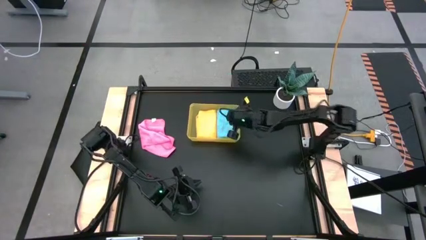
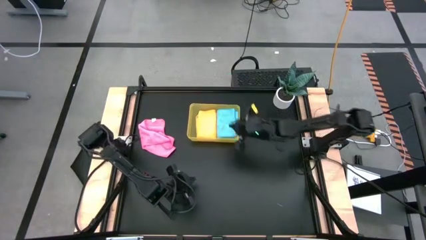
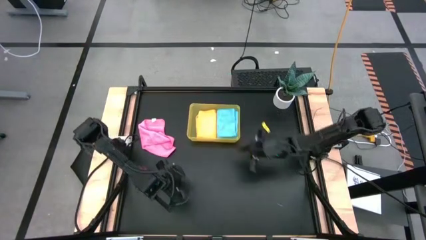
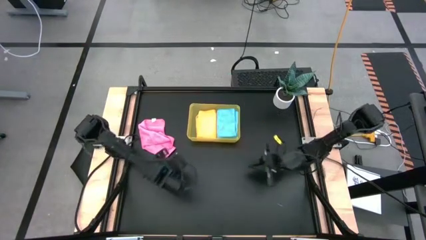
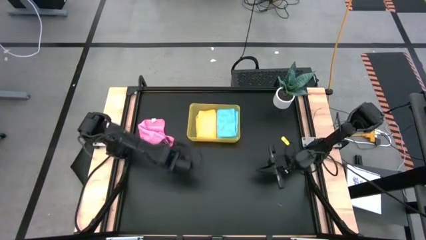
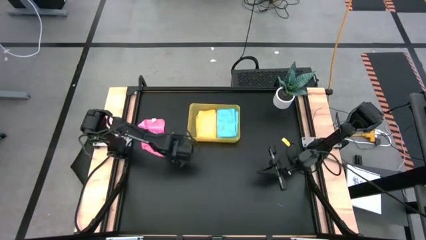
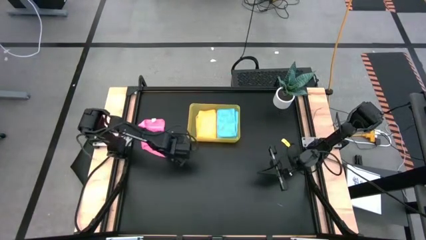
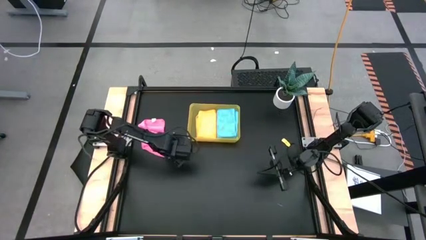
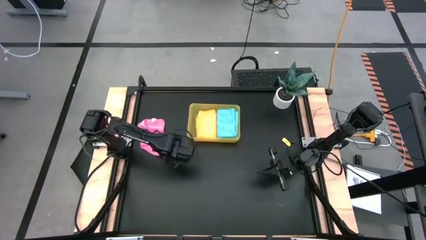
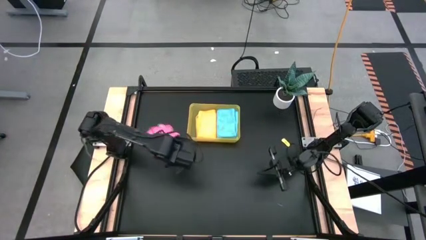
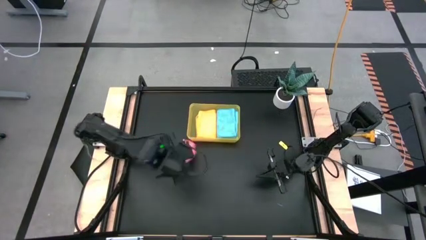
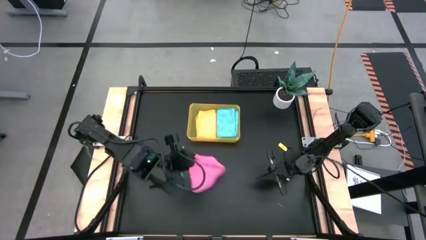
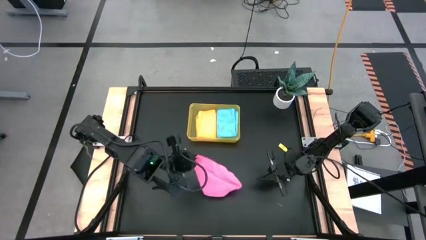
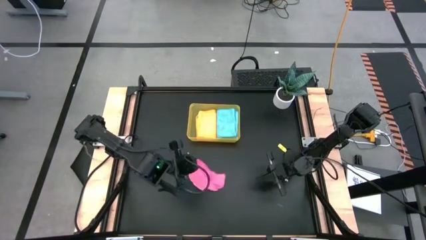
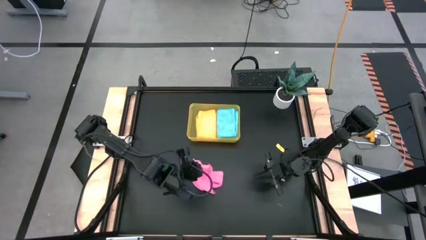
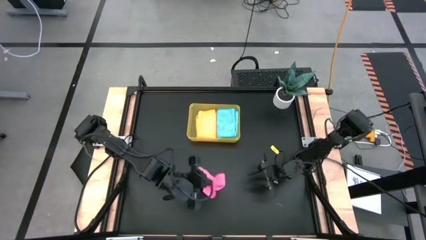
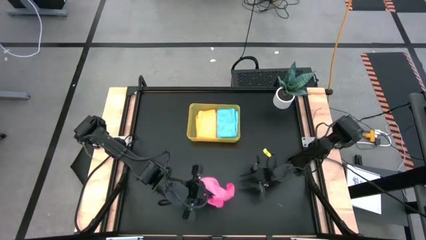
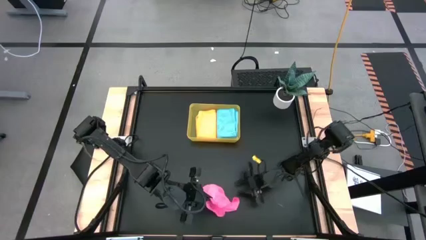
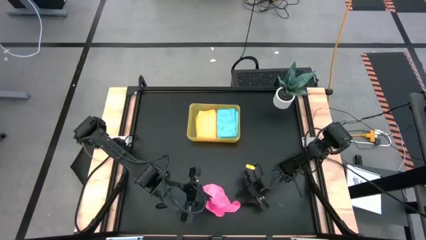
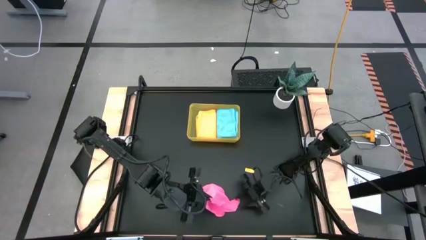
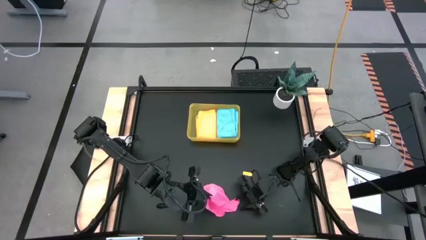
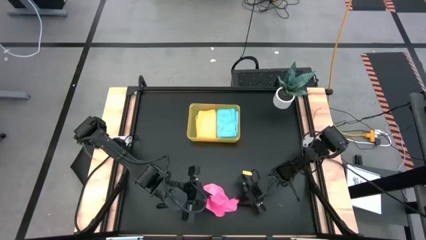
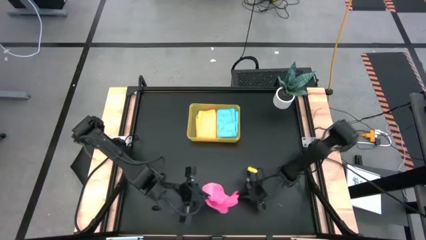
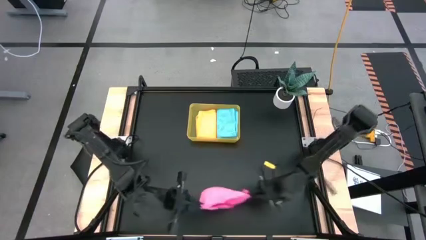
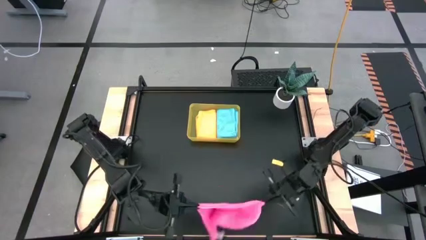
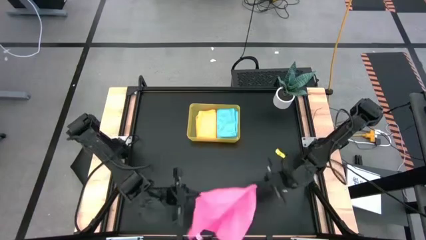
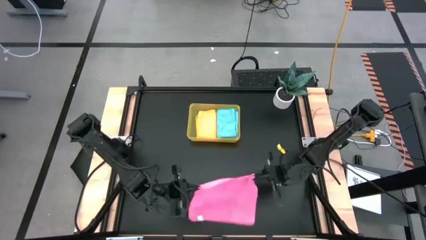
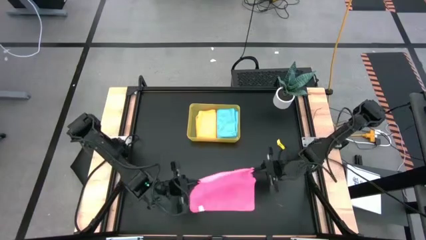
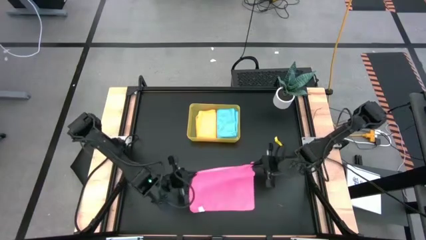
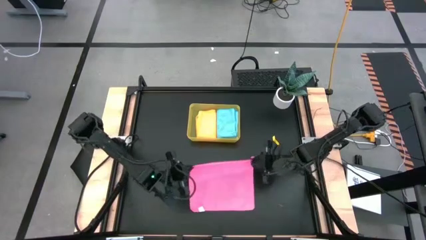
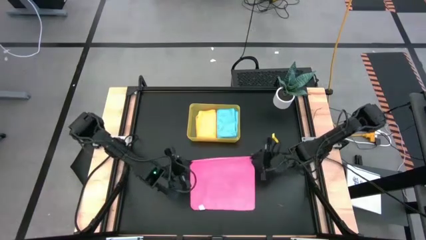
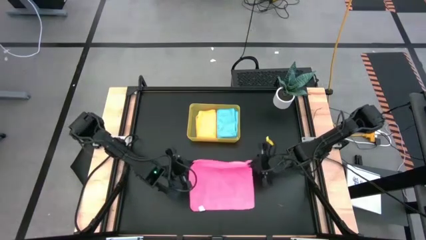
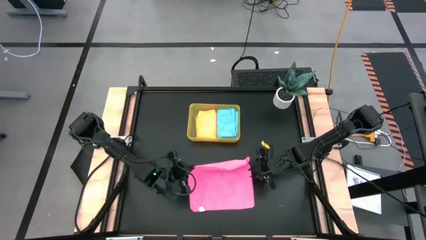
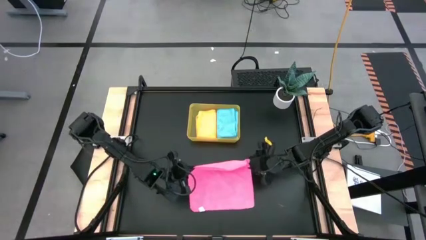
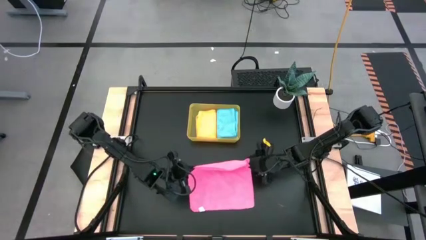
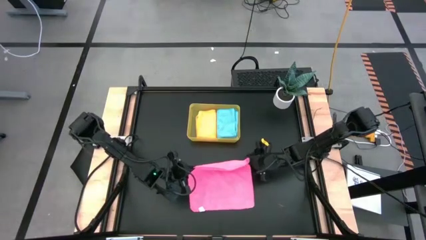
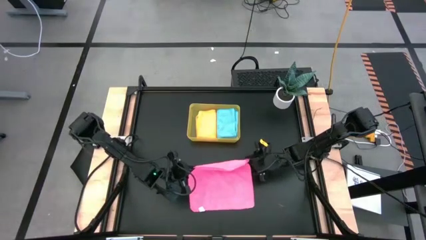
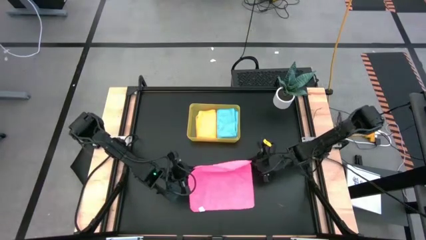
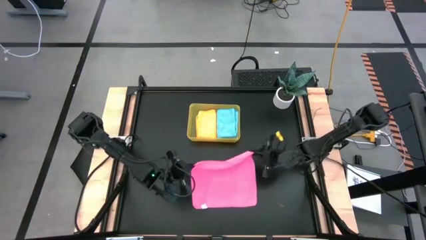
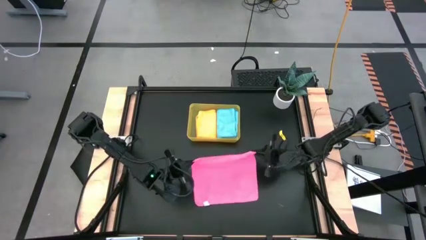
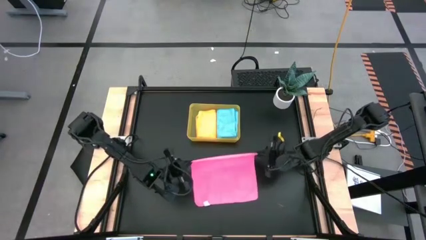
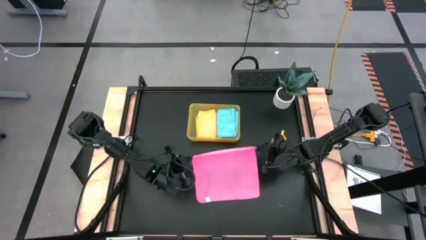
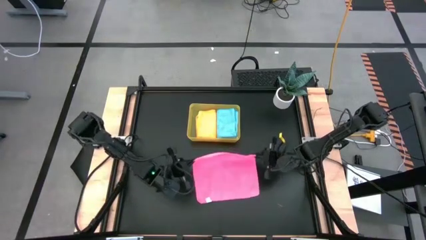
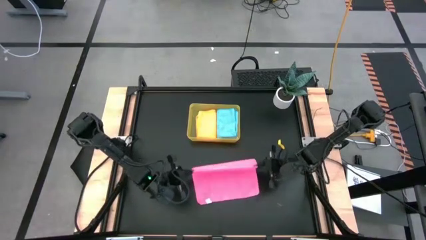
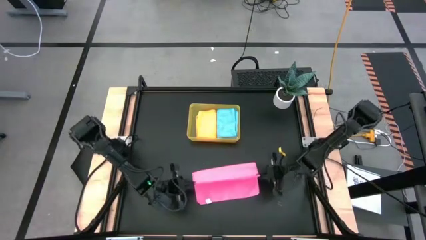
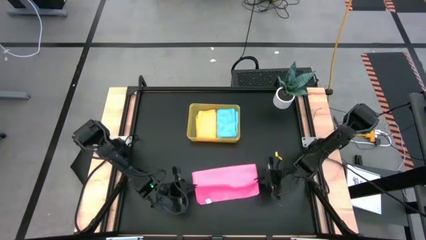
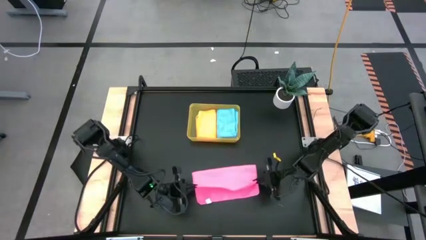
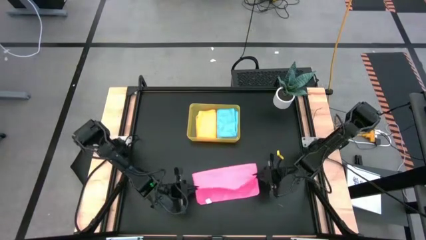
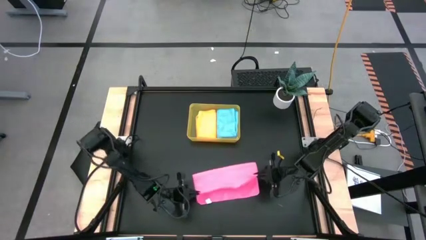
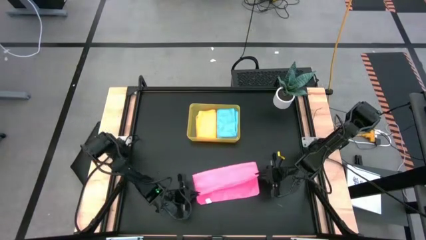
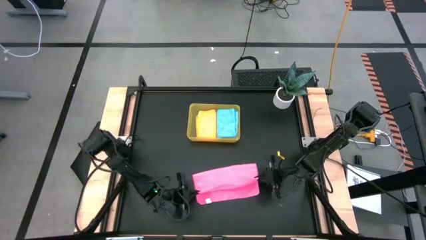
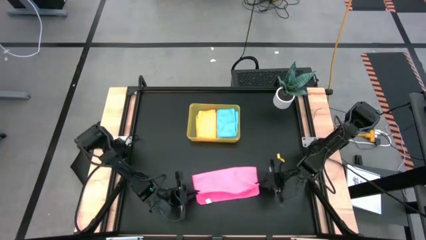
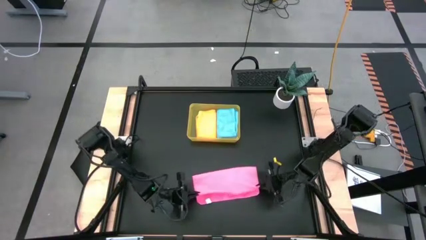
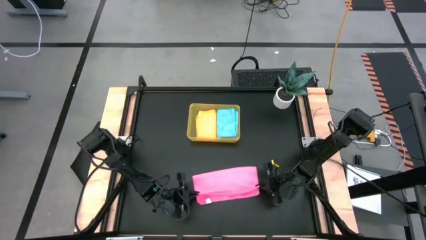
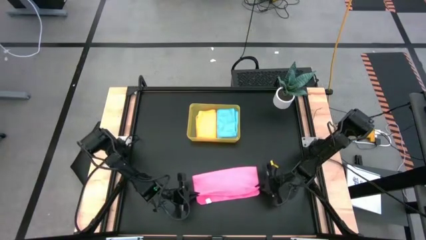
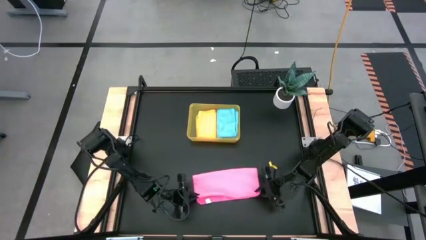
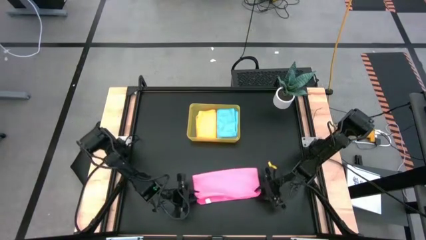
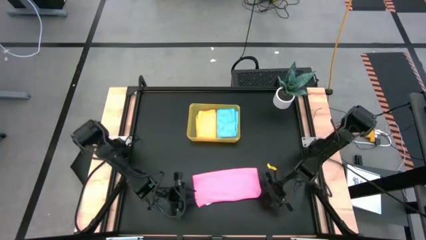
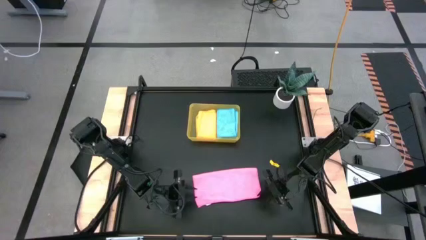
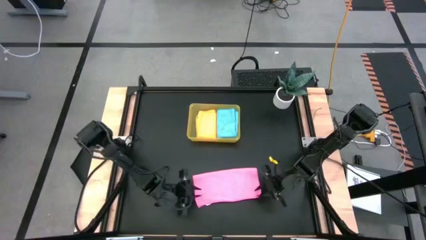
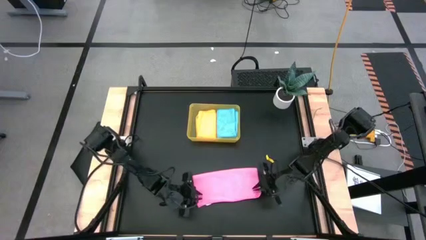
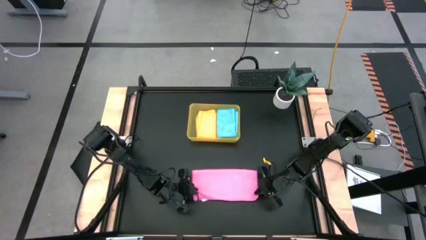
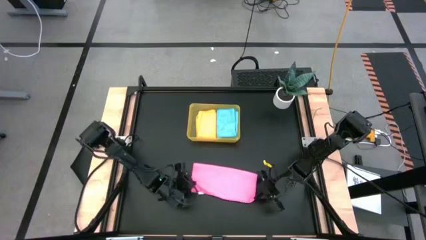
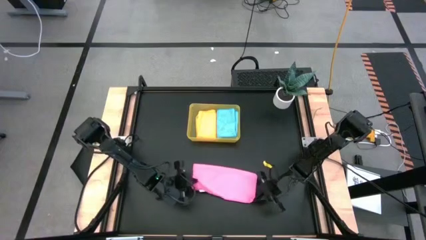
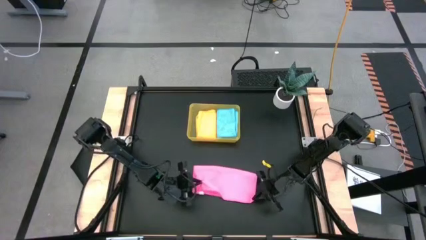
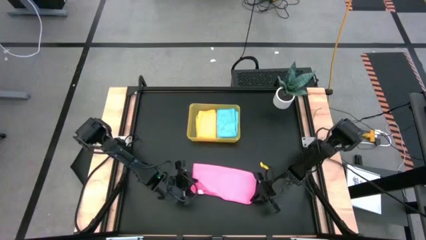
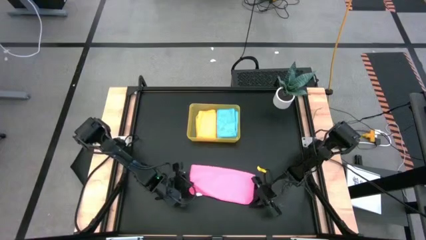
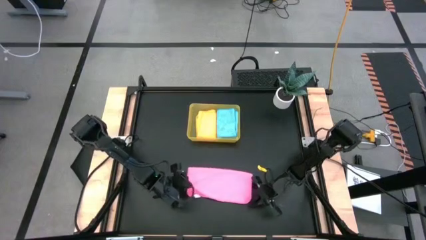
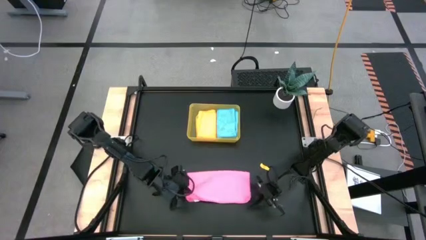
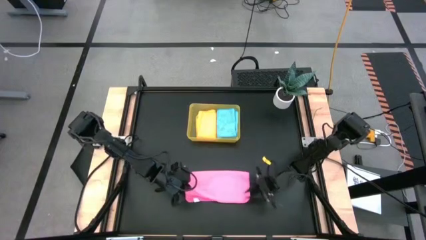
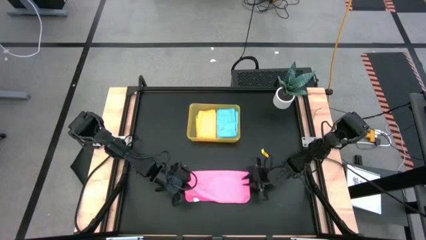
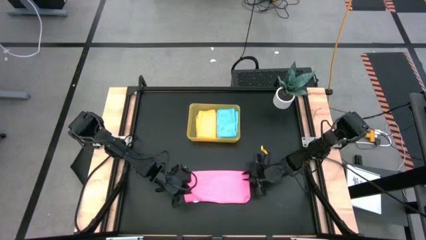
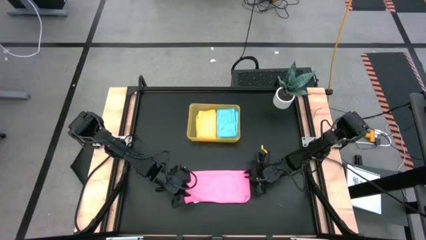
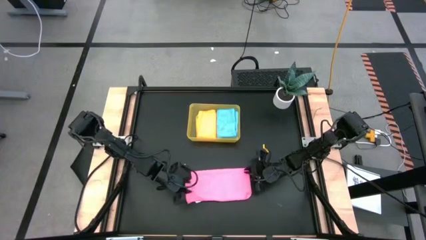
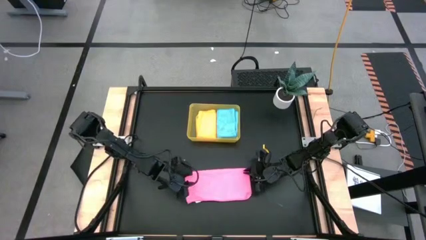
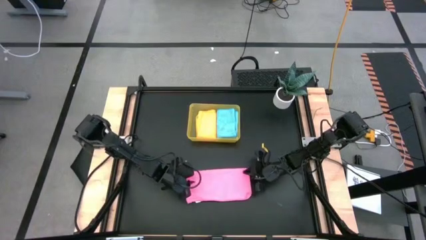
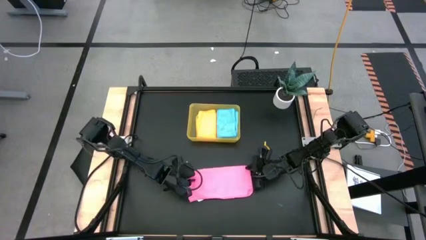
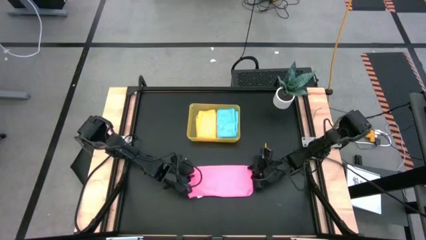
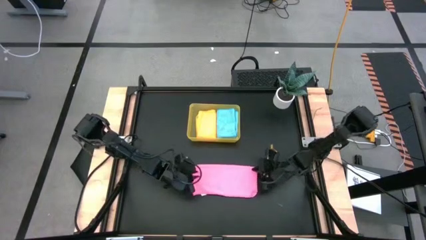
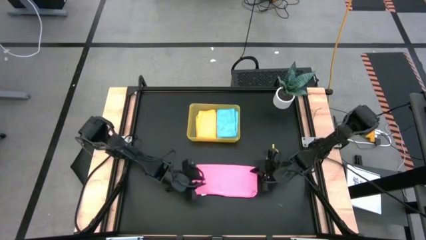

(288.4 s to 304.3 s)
Task: Fold microfiber towels
Fold the pink microfiber cloth
